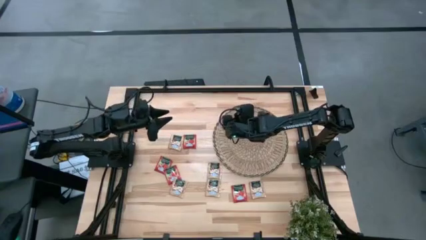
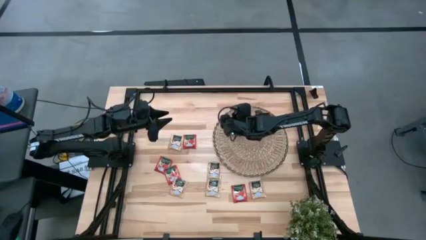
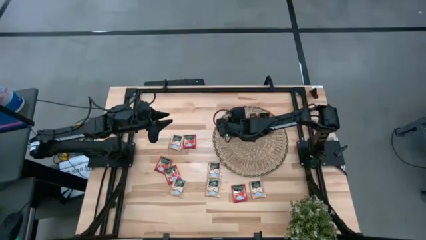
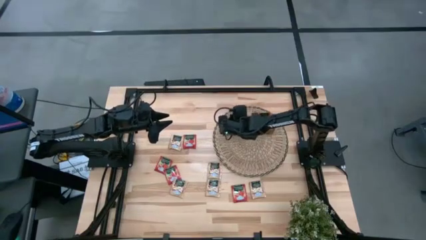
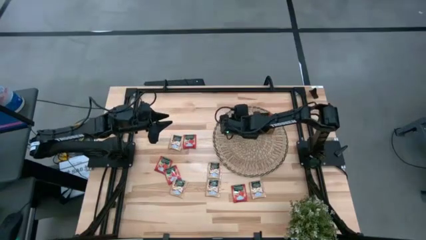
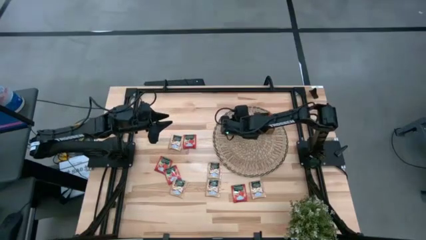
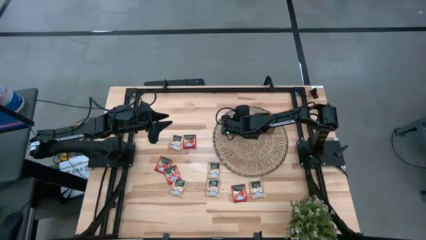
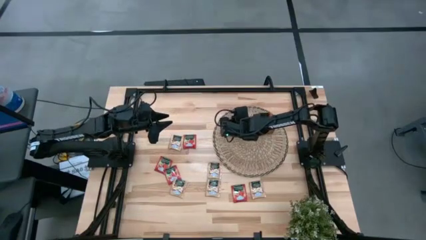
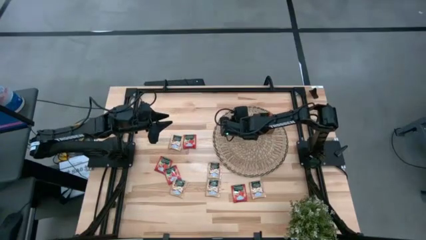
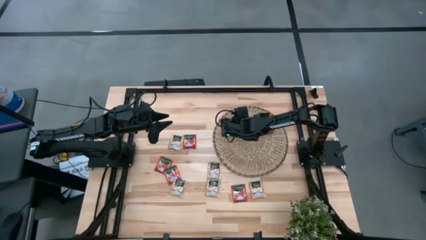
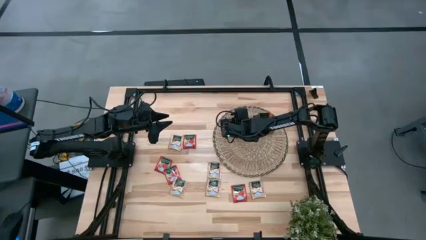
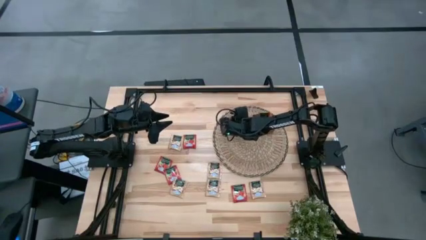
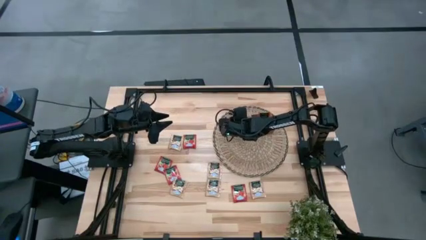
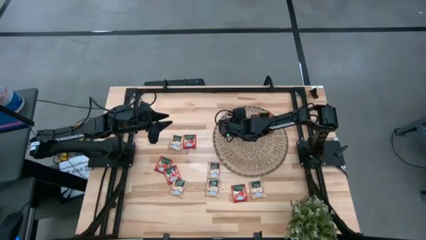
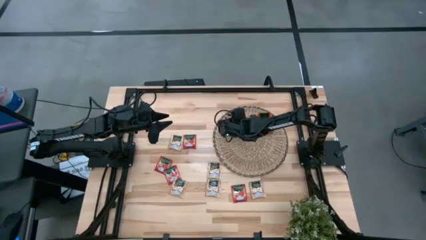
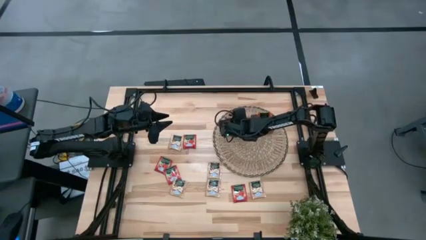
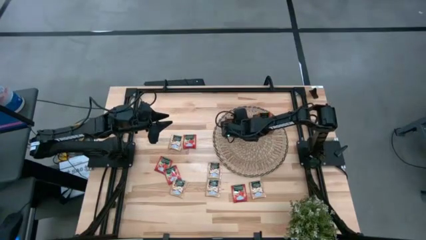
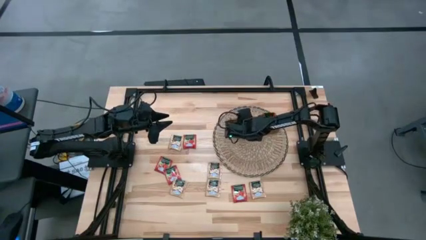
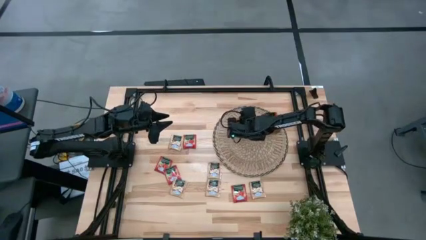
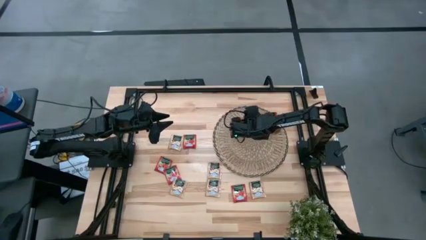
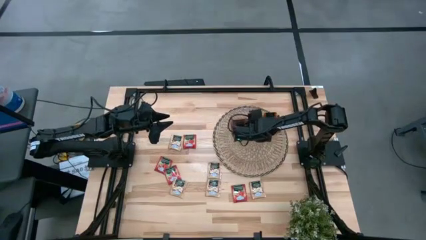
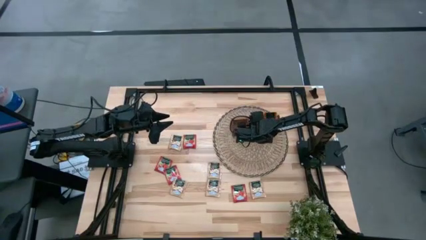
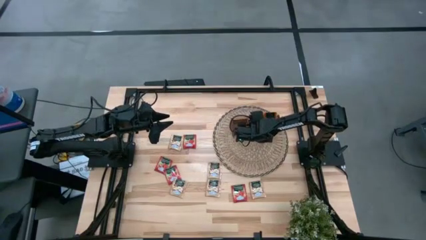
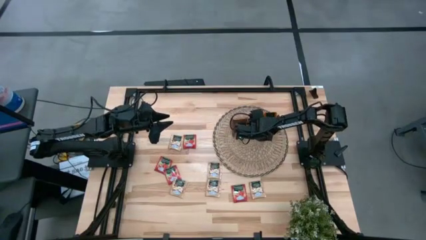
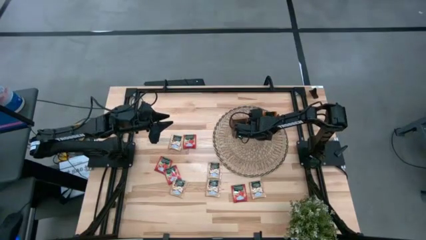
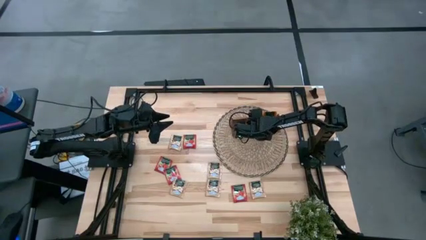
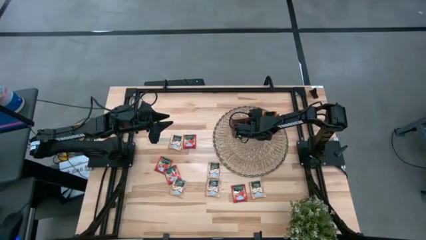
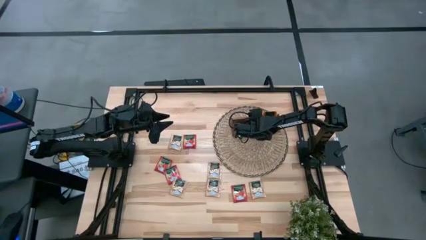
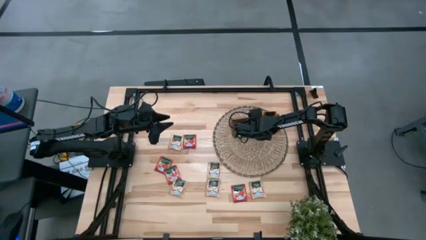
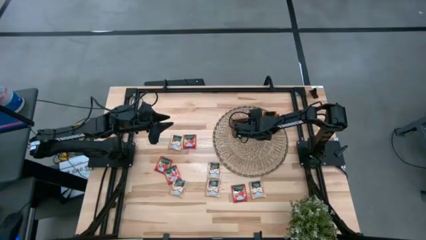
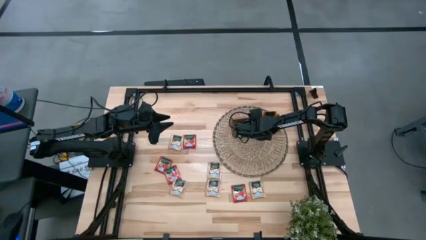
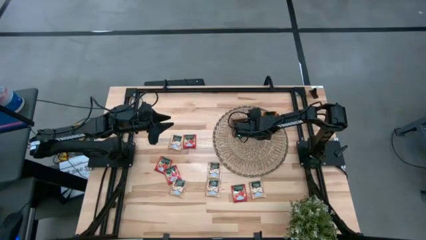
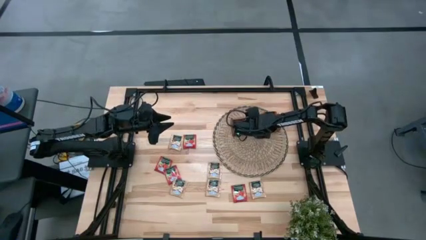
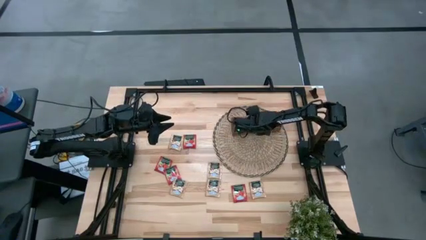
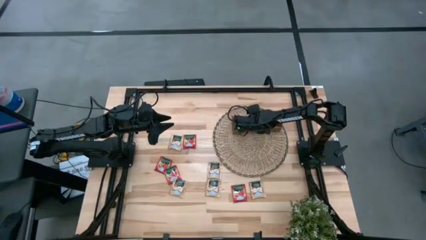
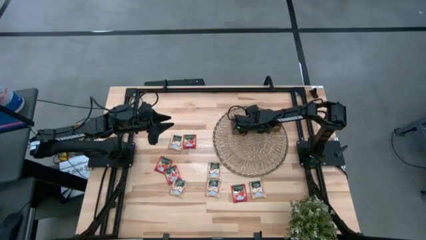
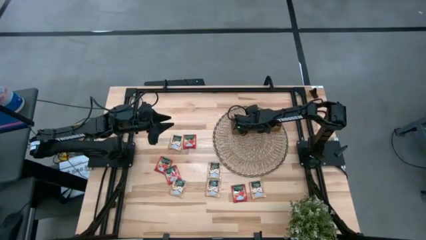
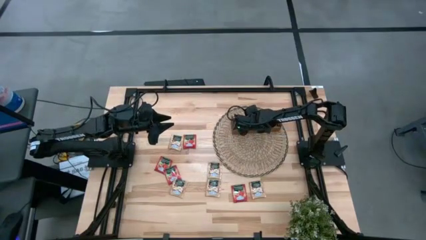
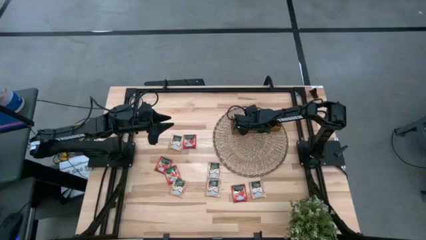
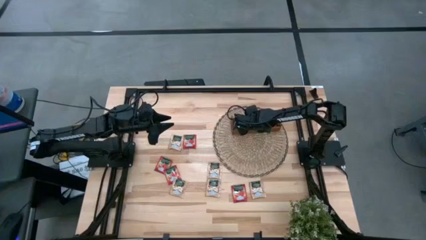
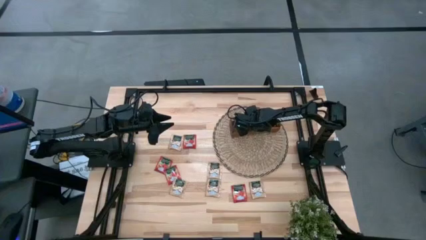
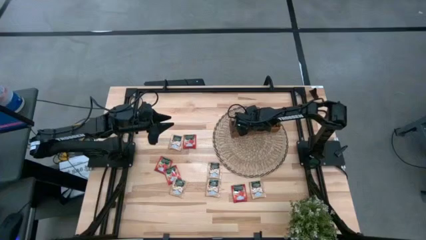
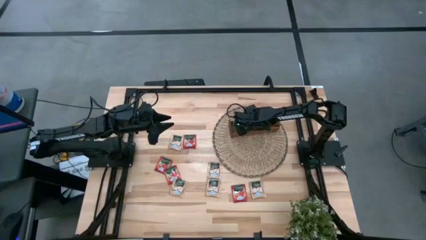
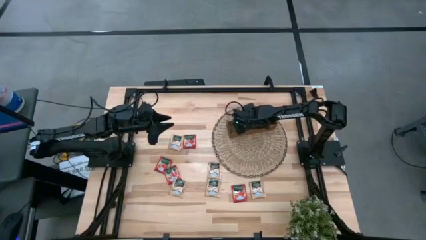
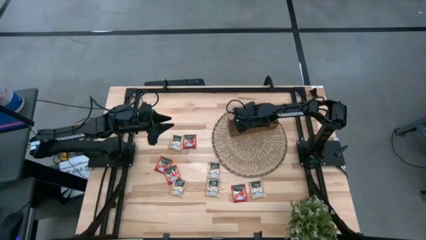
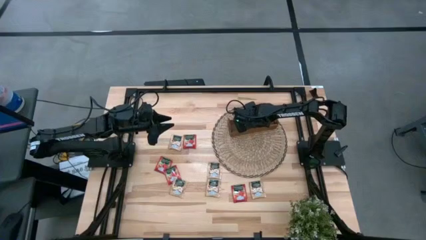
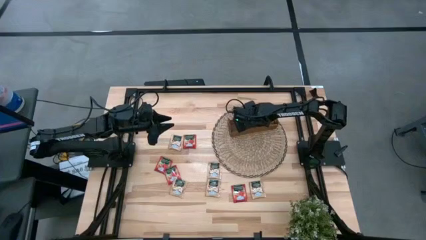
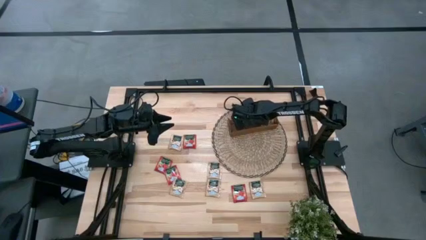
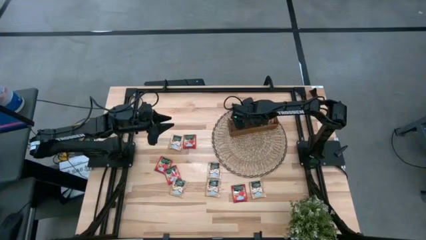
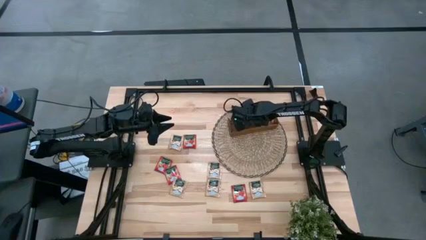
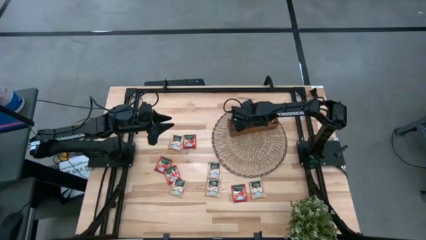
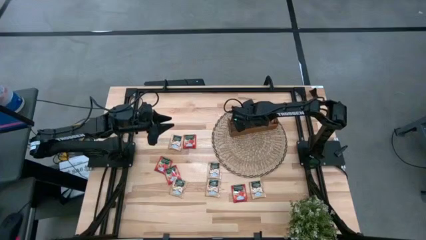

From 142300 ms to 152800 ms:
Task: Pick & Place Tea
Put the red tea pack into the middle compartment of the brown organizer
